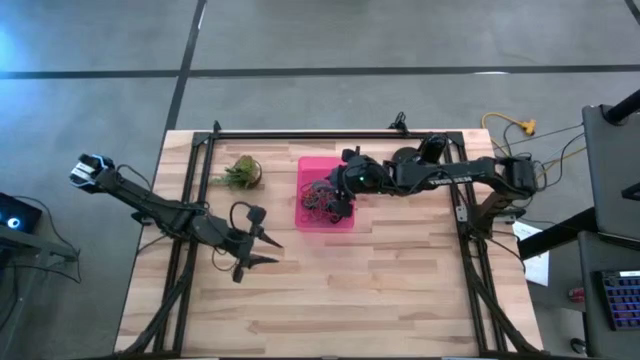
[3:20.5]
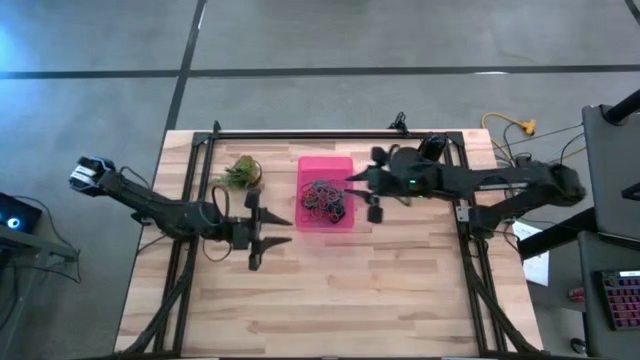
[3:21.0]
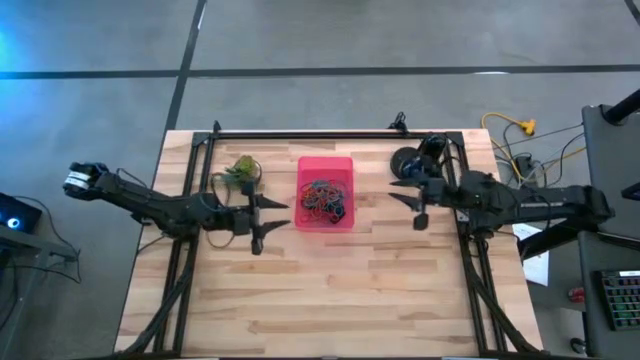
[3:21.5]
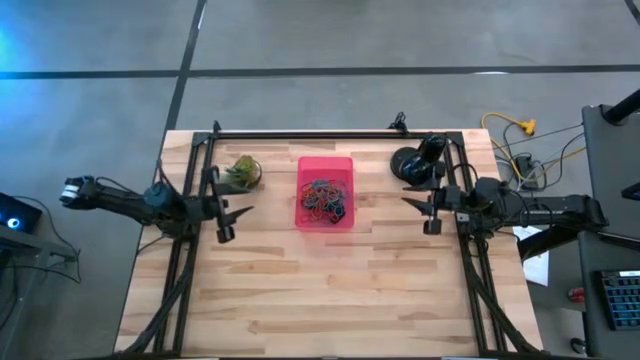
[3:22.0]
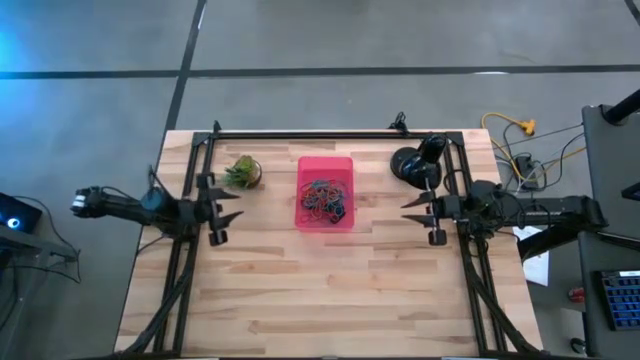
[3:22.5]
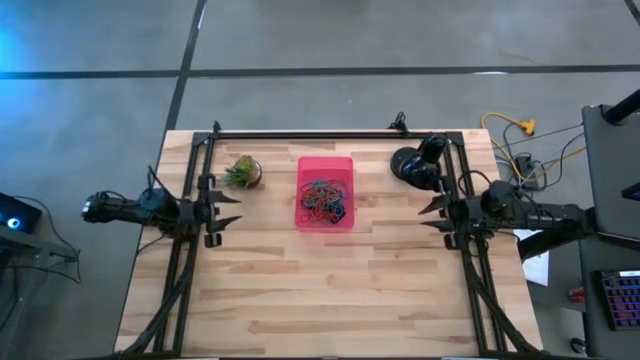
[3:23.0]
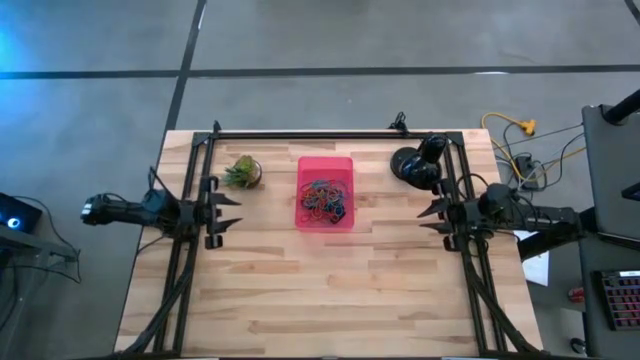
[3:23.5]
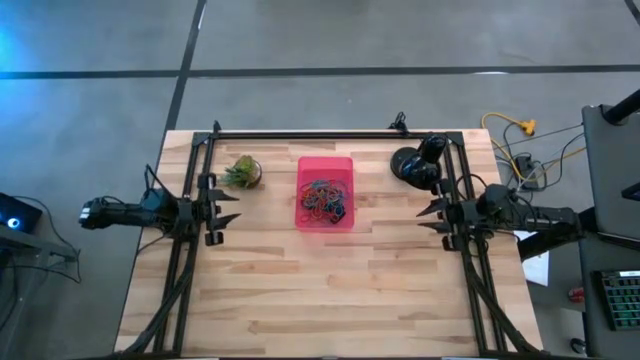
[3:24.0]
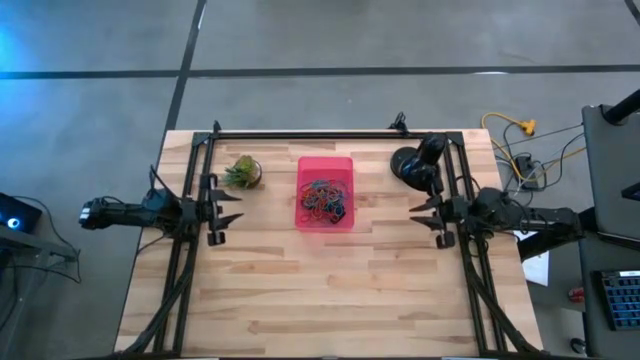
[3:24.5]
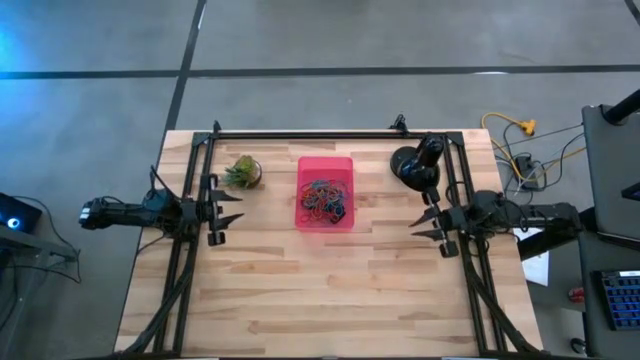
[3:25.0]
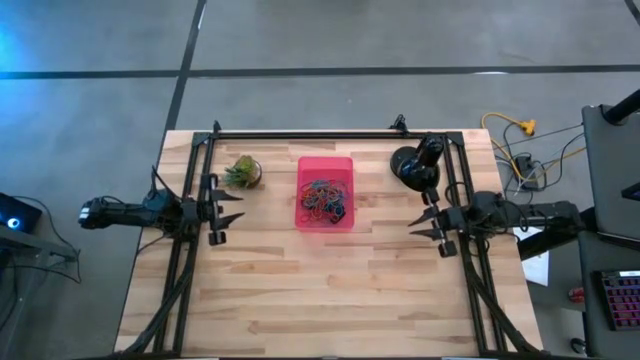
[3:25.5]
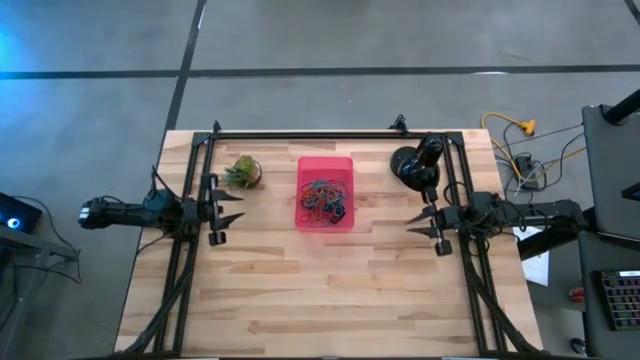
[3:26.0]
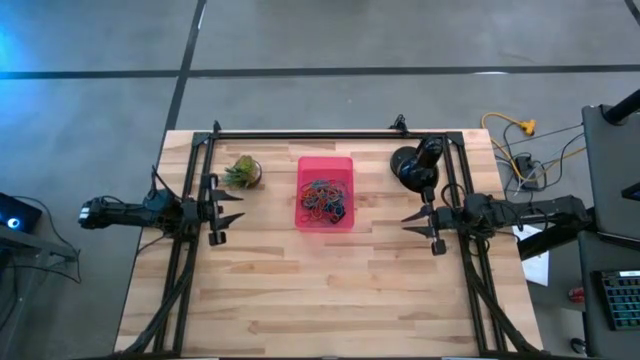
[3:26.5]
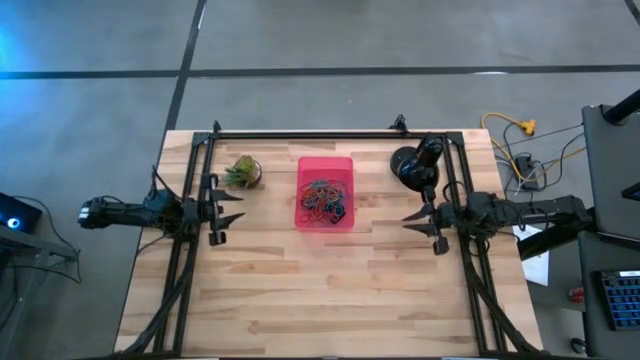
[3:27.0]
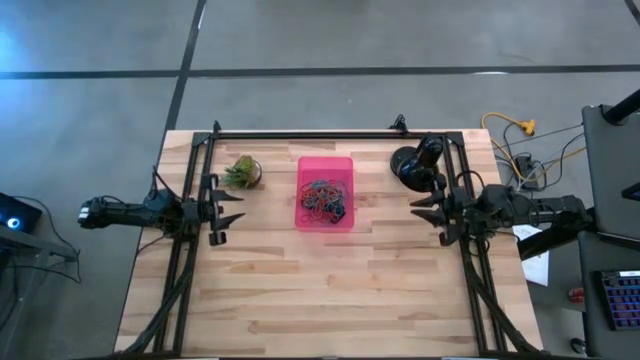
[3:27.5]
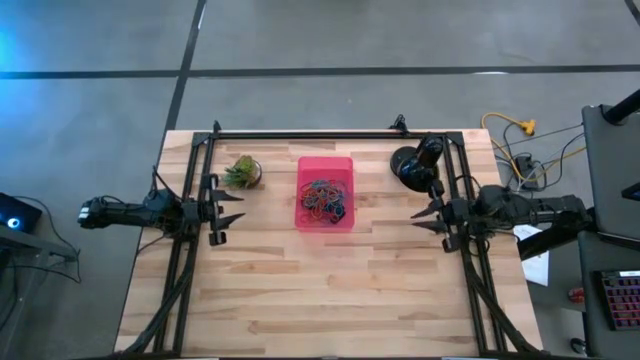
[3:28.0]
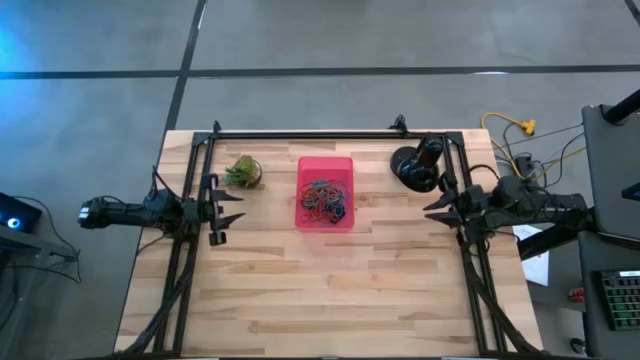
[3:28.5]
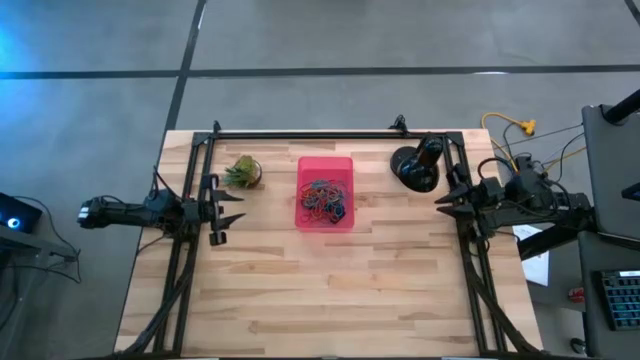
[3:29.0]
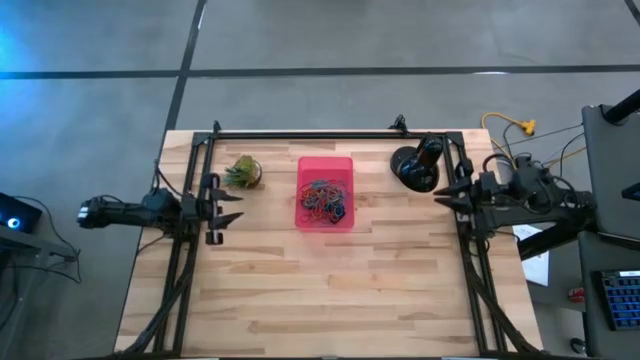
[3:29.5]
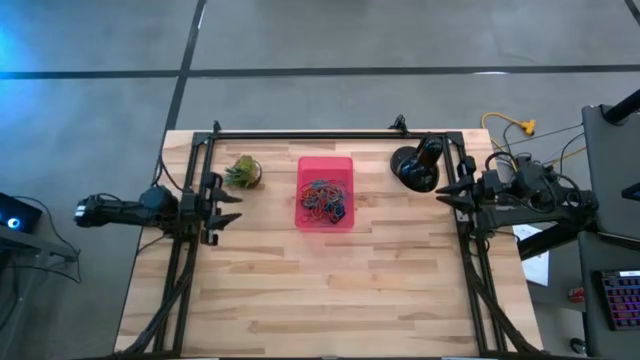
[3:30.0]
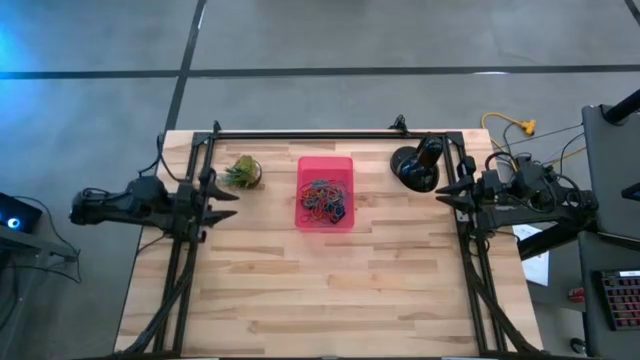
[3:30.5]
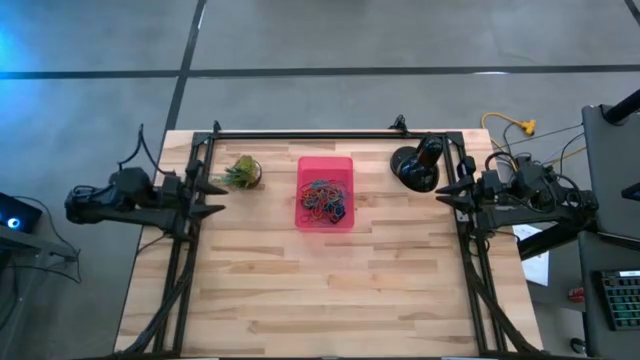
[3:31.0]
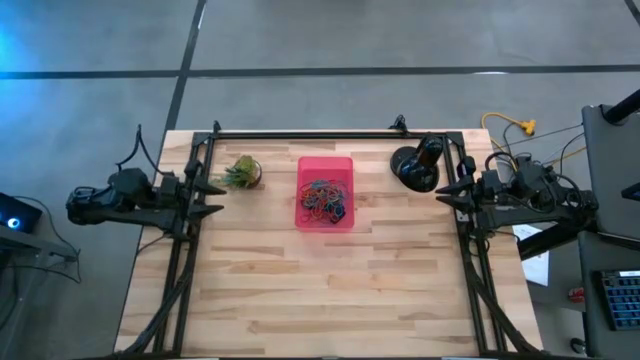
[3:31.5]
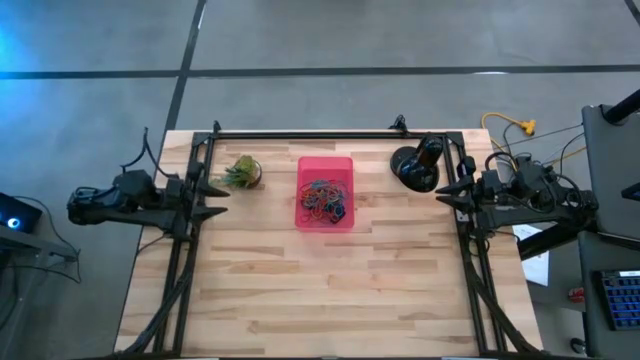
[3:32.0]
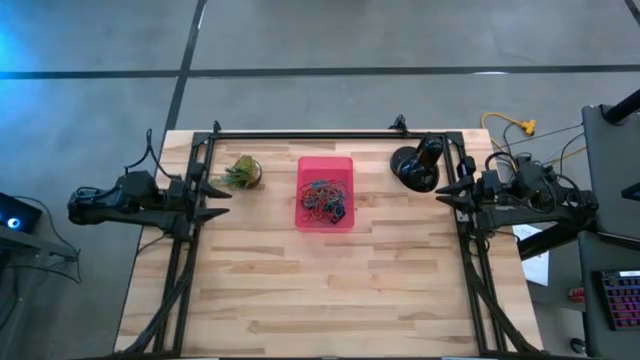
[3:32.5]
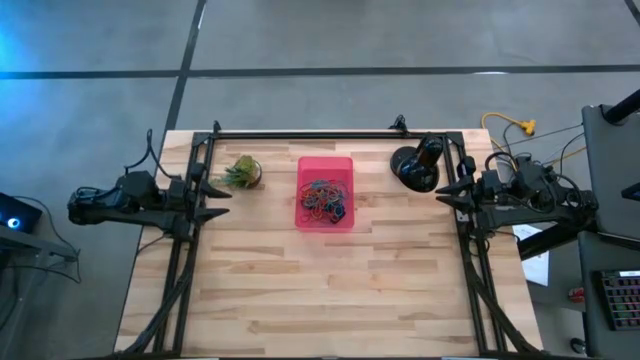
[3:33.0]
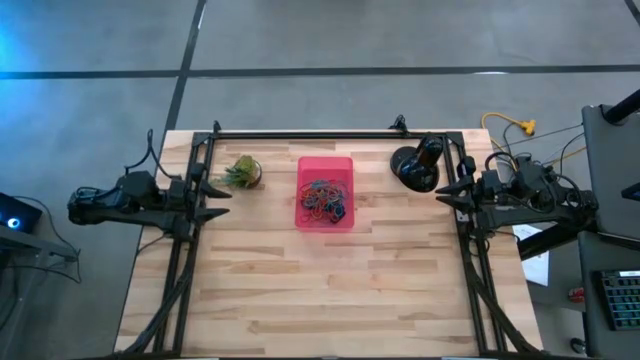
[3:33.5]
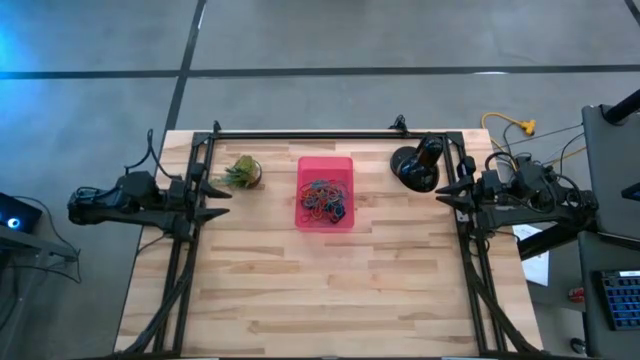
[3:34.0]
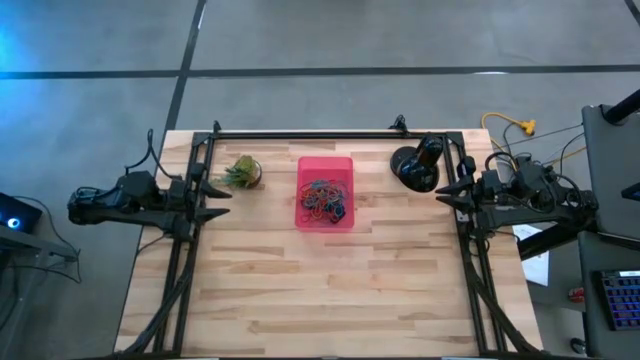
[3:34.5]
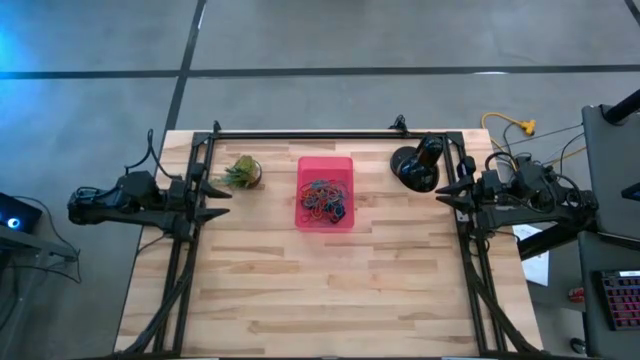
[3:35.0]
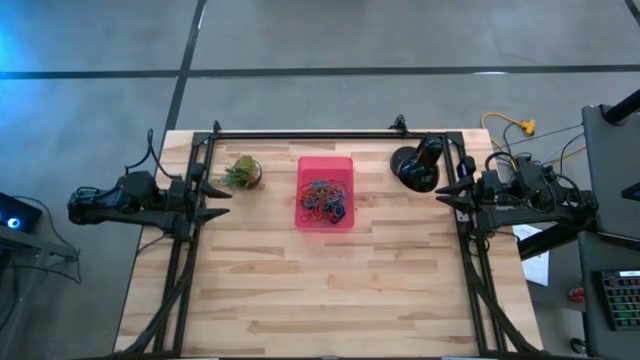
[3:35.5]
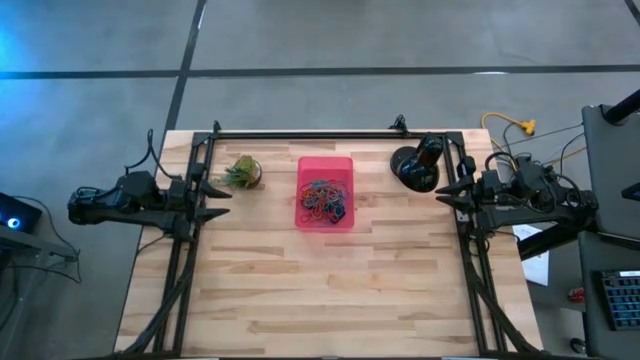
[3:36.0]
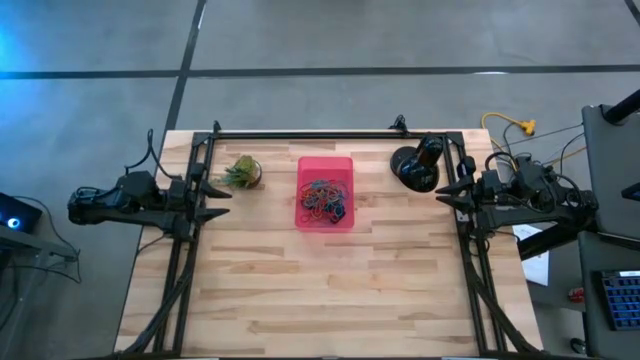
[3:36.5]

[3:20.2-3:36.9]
Task: Pick and place rubber bands into bin
Return to Home Position

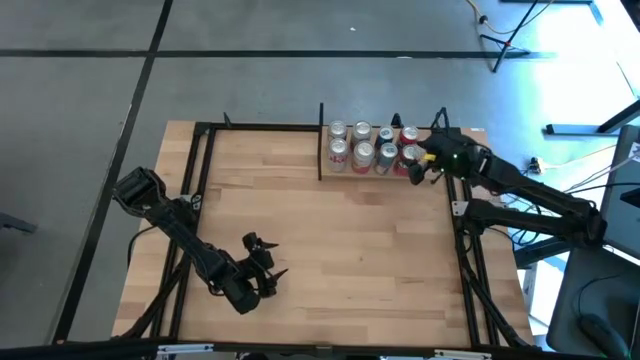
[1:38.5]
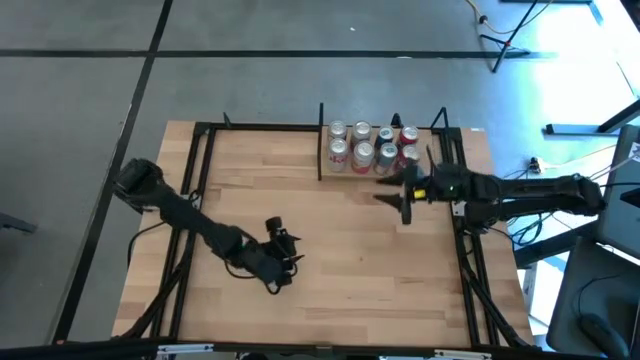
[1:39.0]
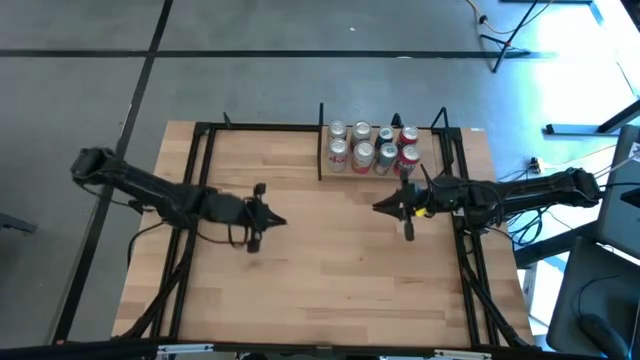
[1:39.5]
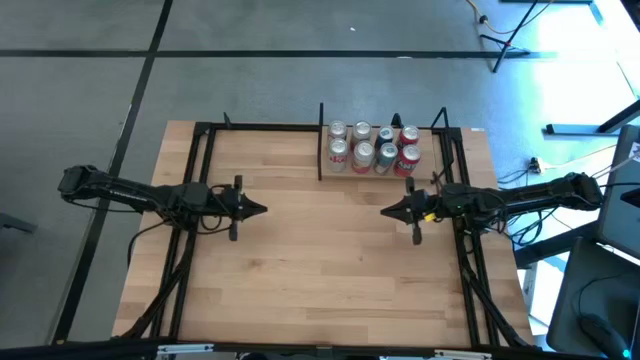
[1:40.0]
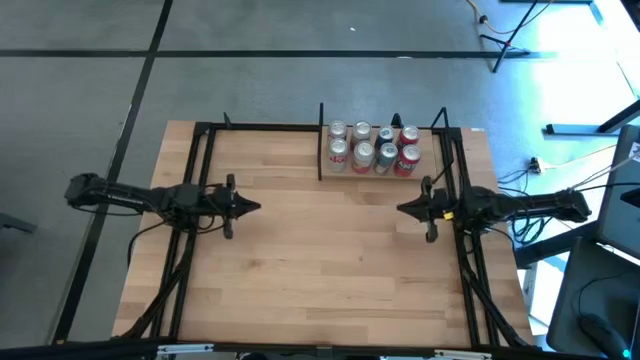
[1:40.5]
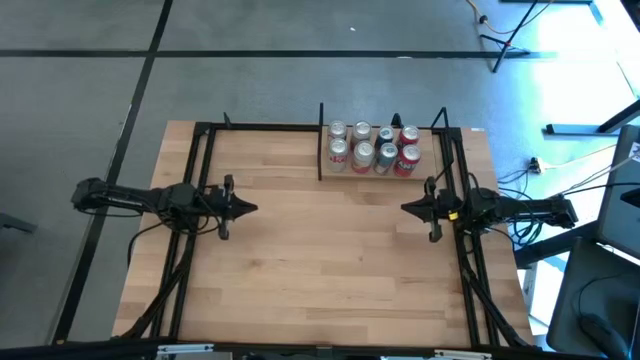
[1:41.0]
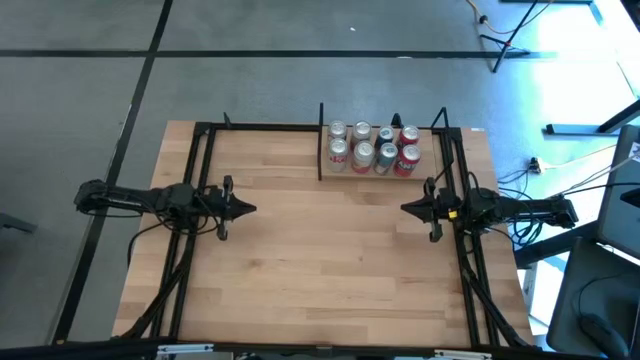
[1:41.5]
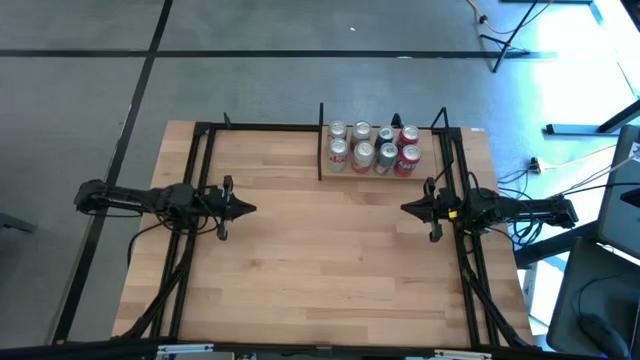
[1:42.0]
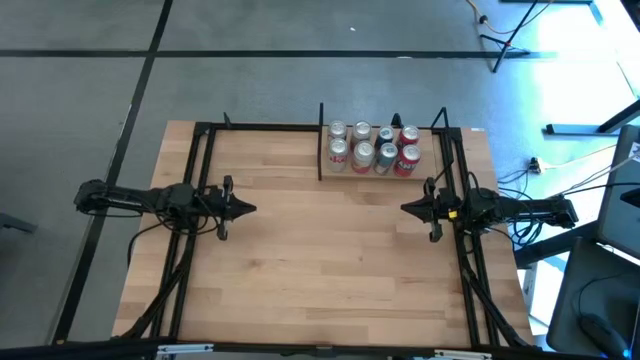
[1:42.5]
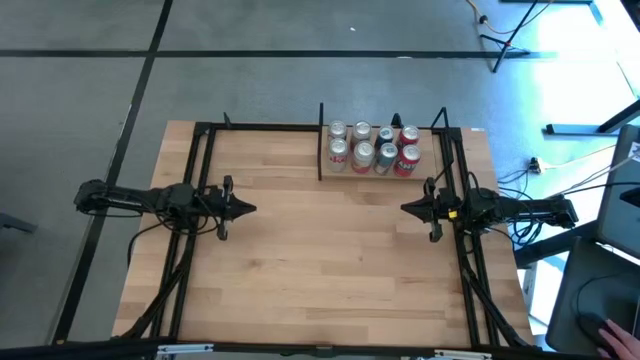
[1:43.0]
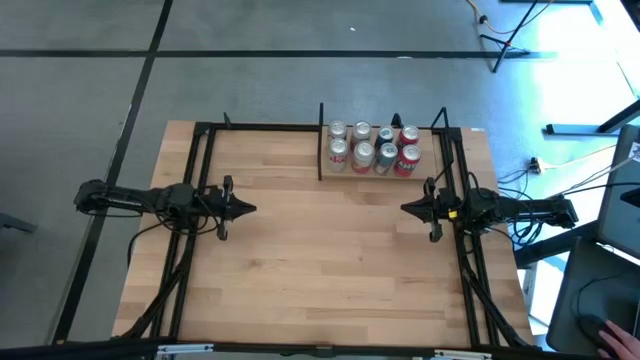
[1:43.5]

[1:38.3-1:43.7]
Task: Place canned beverage on shelf
Return to Home Position
